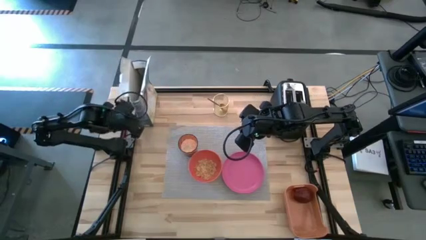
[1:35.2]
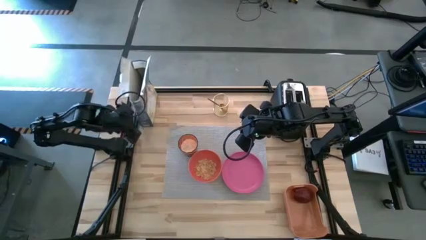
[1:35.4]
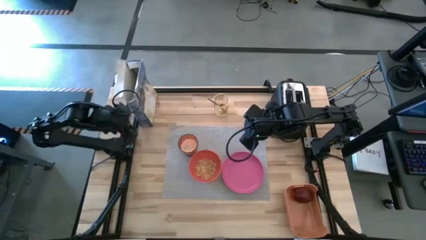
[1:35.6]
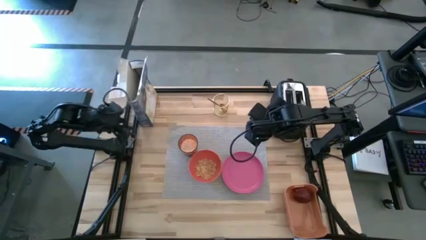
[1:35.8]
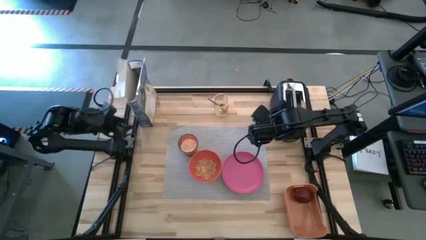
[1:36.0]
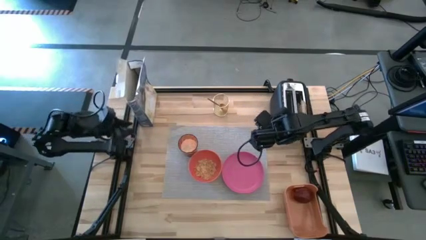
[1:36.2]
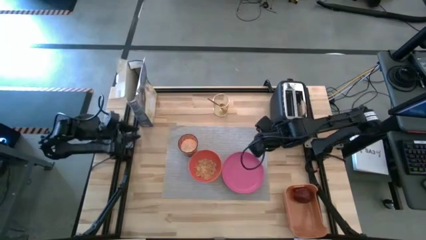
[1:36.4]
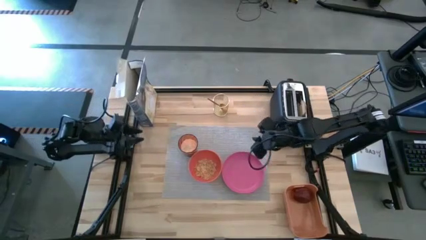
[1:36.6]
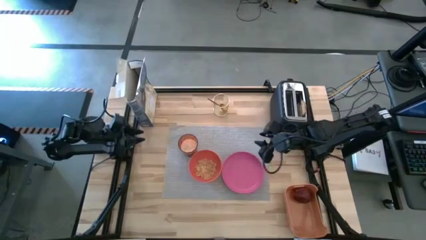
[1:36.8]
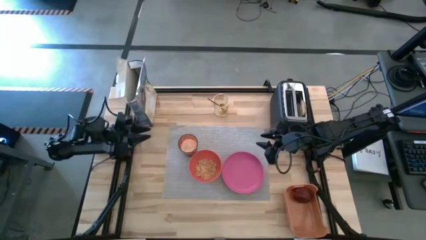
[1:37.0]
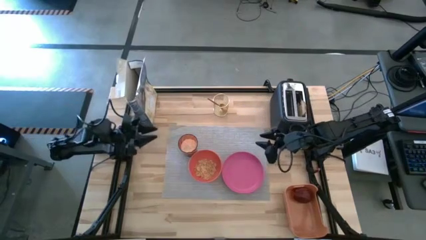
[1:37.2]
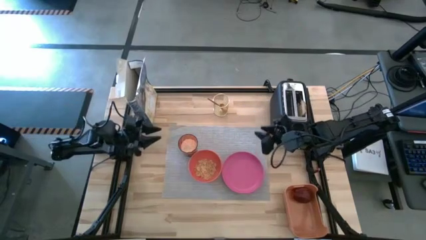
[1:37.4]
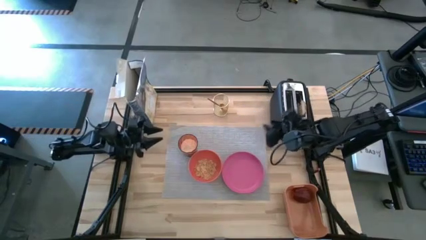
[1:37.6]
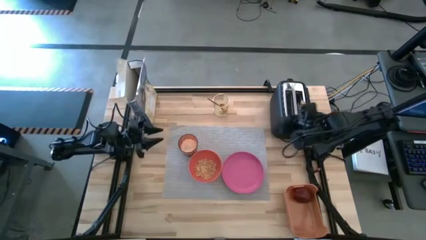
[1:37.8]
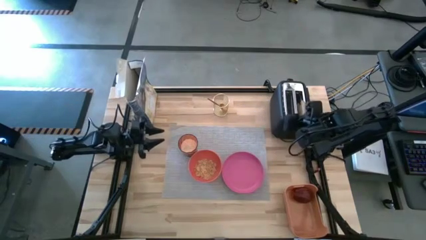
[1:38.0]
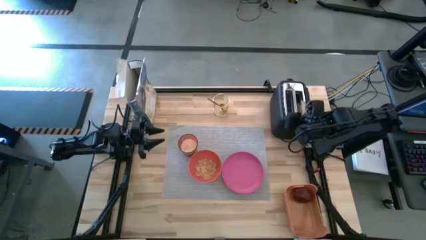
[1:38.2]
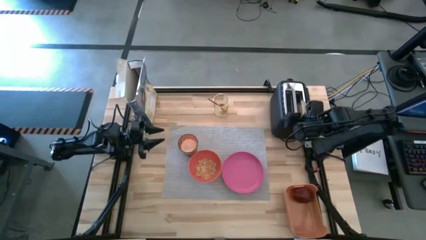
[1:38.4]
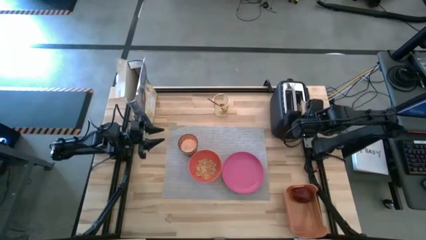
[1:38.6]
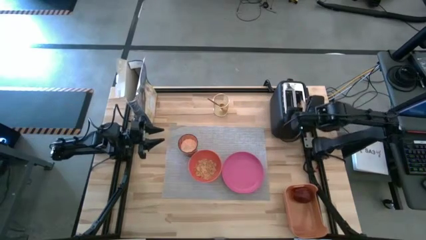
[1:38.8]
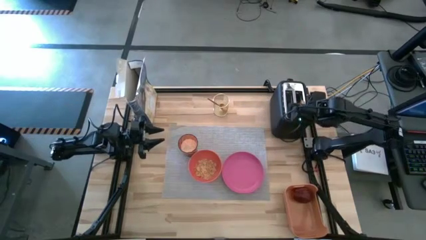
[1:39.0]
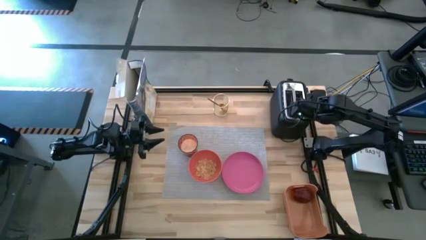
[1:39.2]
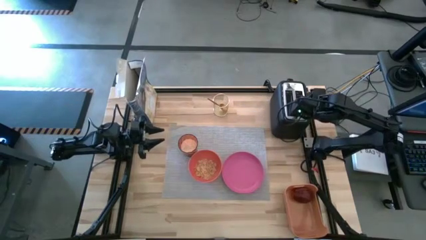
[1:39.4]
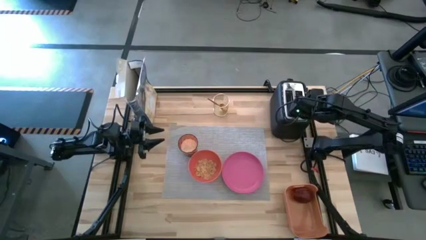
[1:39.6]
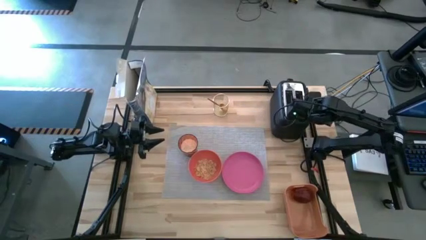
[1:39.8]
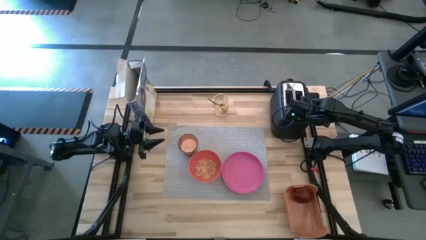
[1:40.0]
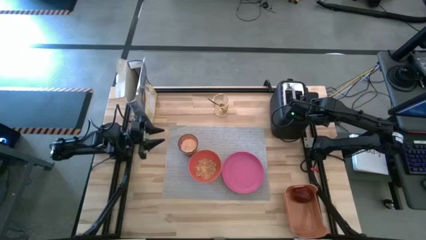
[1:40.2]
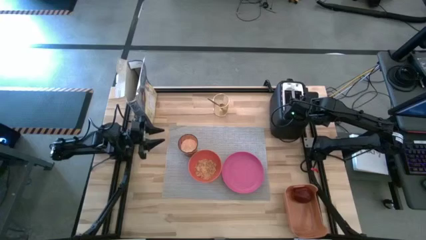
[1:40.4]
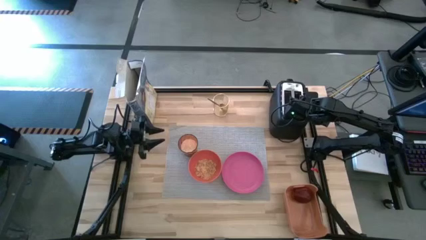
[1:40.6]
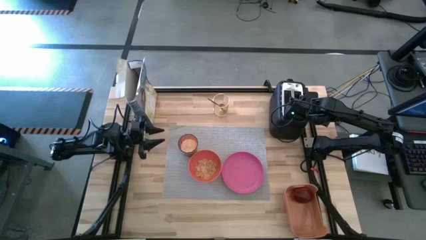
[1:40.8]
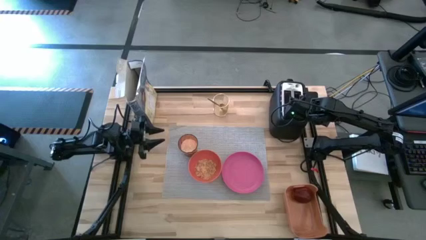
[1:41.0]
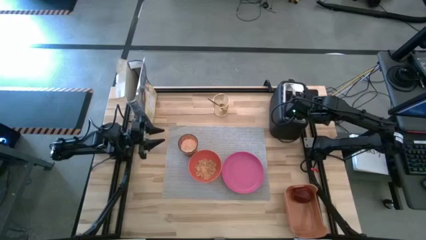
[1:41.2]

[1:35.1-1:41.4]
Task: Arrange a breakfast setting
Put the toasted bread on the the pink plate

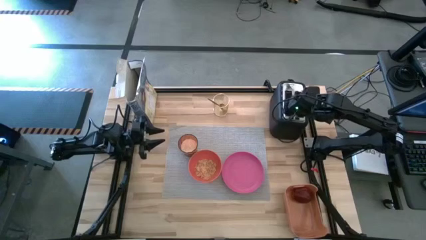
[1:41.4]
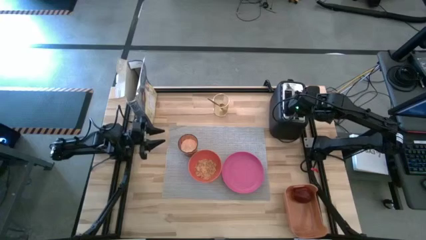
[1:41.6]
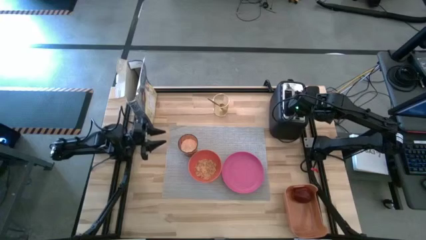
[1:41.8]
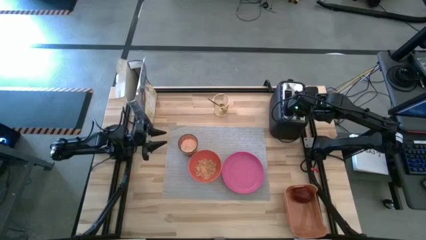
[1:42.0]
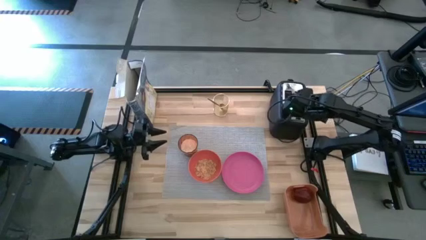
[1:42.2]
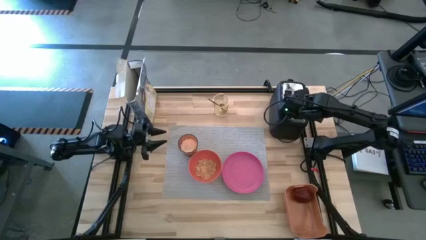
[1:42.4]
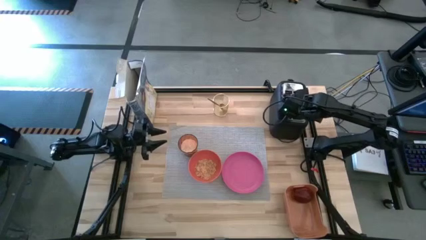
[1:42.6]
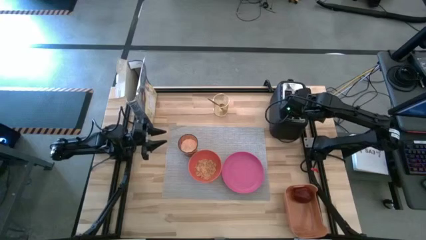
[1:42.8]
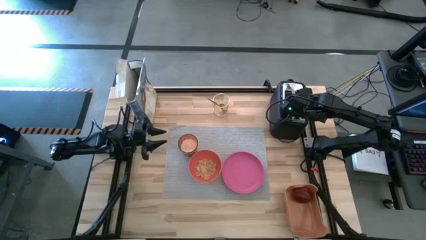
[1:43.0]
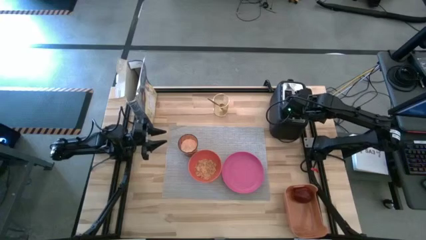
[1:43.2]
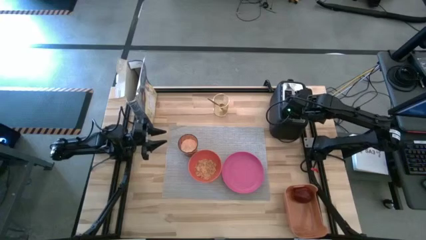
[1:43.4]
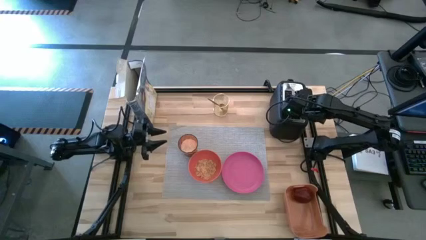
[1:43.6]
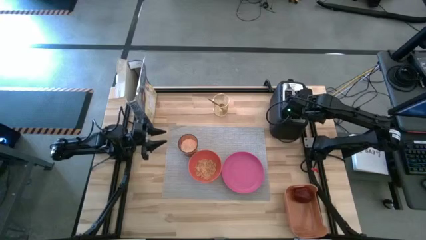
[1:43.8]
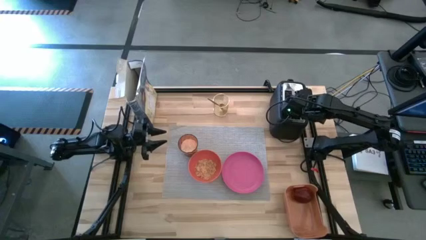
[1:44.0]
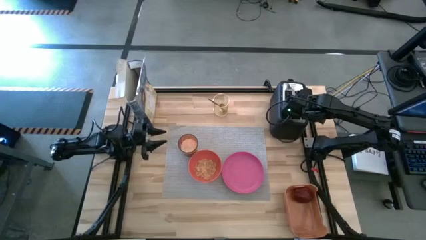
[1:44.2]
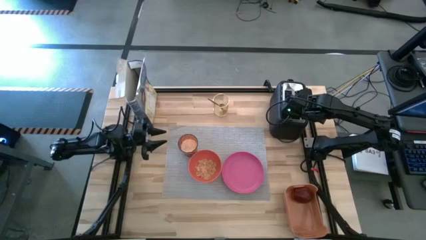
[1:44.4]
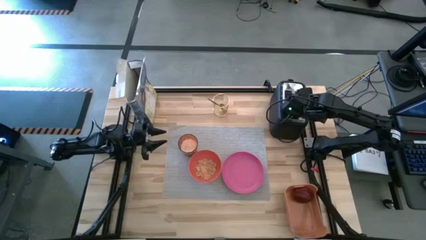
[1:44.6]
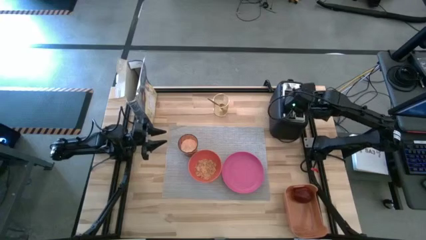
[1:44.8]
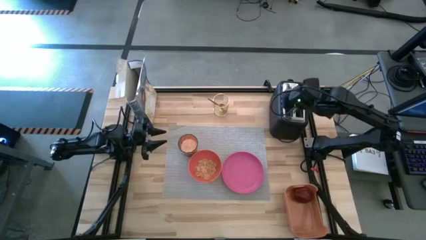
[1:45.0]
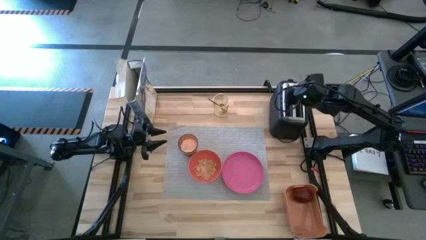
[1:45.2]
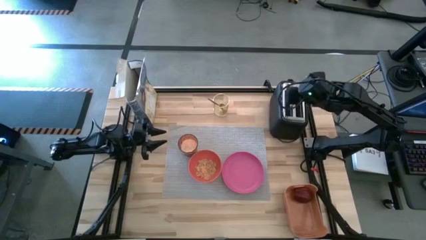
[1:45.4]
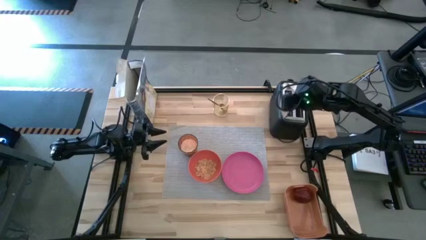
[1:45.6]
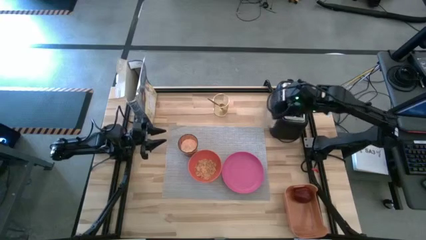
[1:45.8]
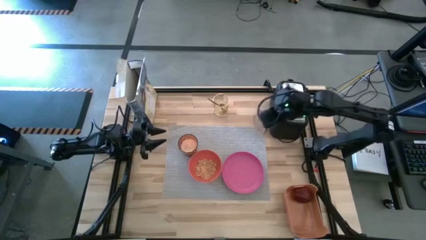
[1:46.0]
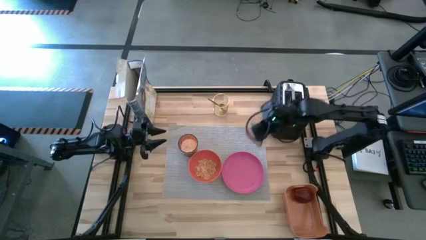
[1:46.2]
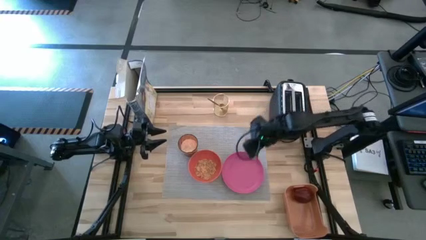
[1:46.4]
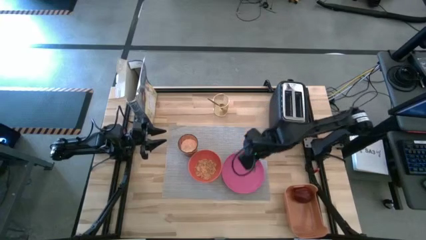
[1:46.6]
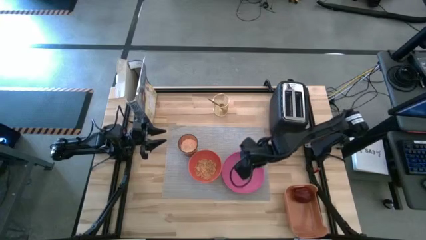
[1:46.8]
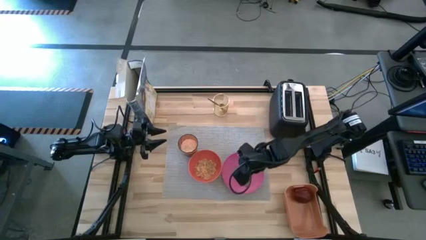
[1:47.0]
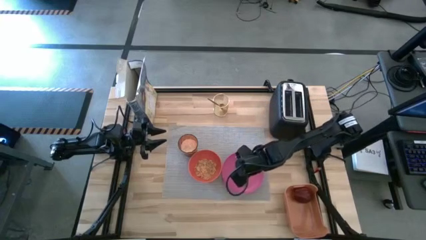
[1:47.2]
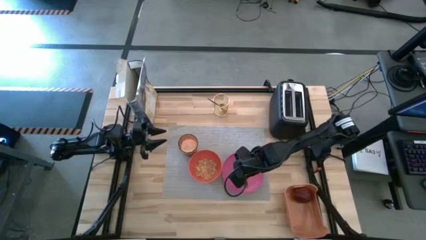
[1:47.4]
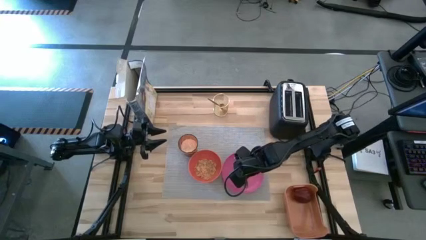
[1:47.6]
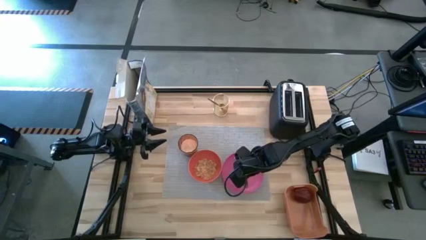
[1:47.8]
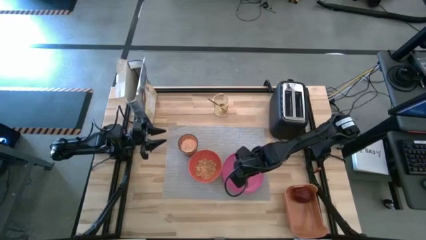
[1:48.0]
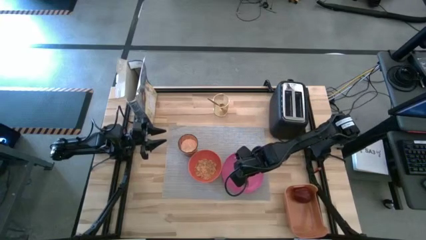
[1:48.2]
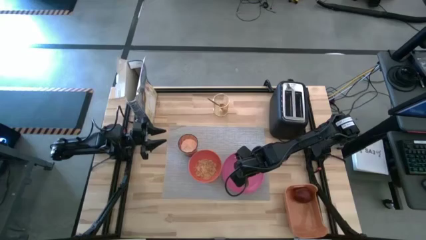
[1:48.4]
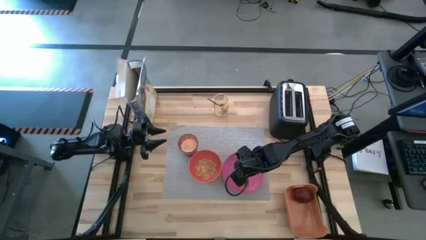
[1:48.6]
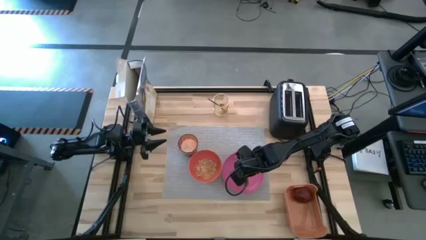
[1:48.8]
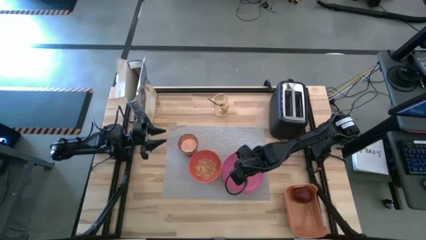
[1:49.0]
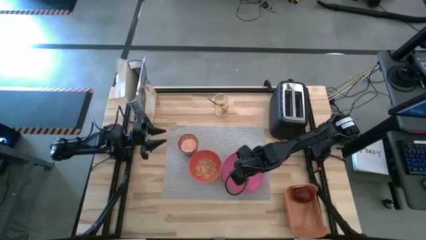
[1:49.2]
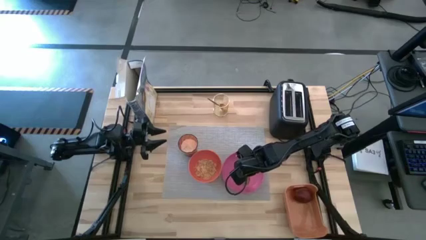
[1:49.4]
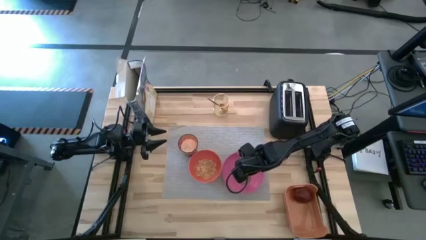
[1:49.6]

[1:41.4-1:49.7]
Put the toasted bread on top of the the pink plate on the gray table mat
